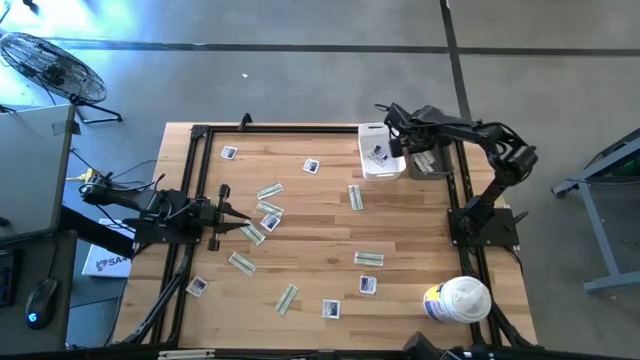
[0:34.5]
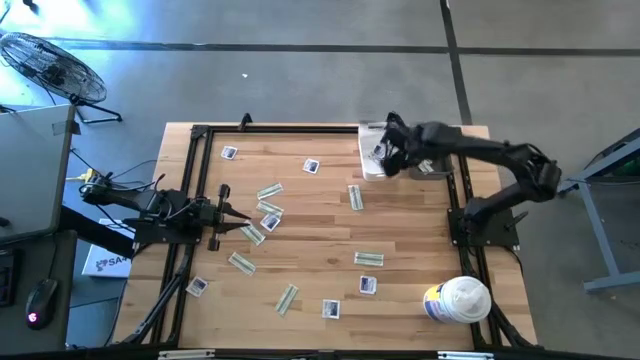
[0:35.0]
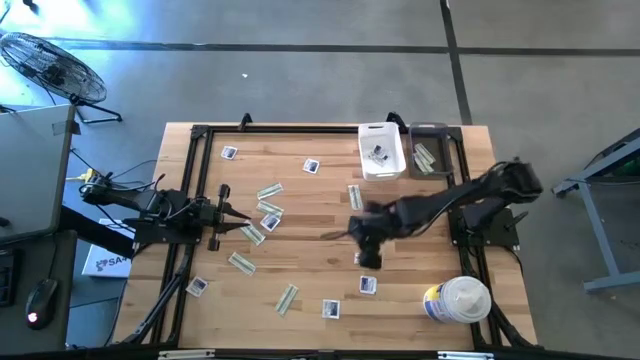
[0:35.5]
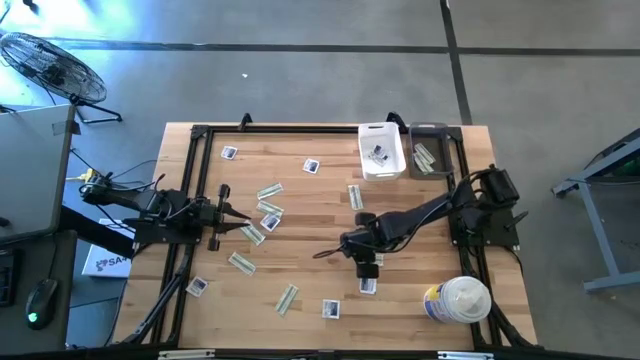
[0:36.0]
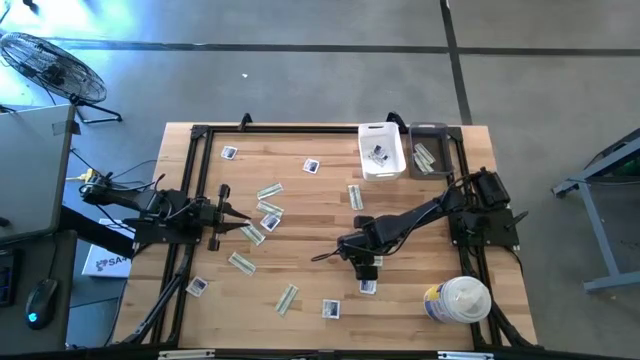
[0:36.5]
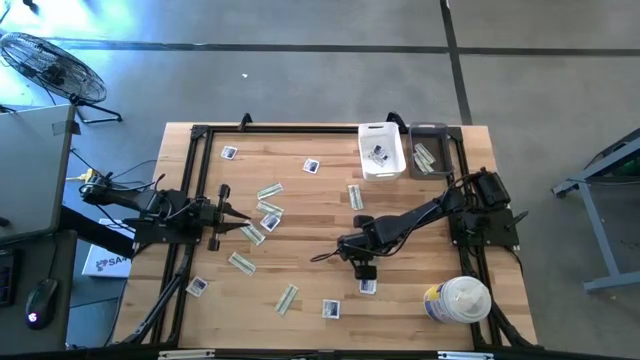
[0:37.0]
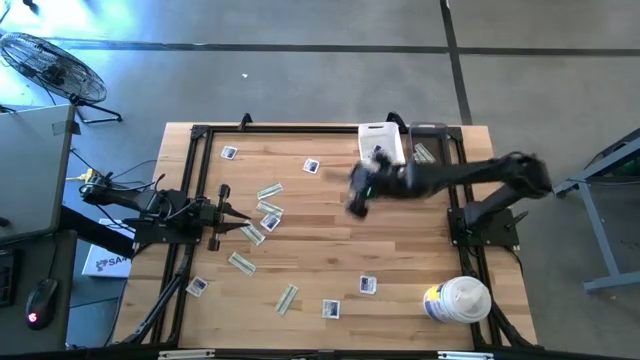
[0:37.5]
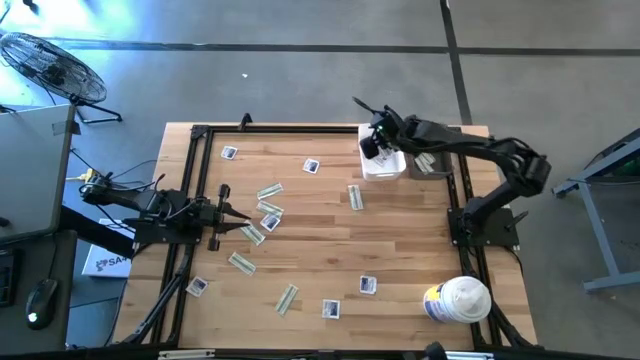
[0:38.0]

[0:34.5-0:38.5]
Task: Pick & Place First Aid Supplies
Put the bandage into the gray bin

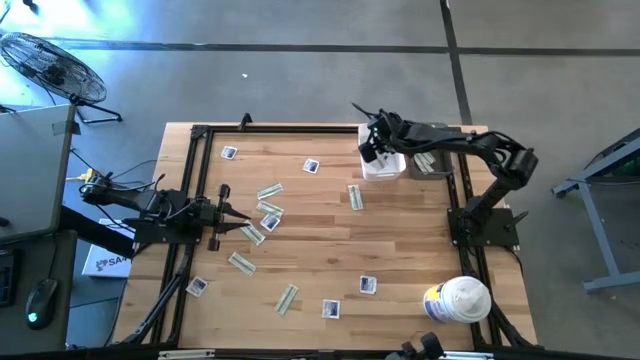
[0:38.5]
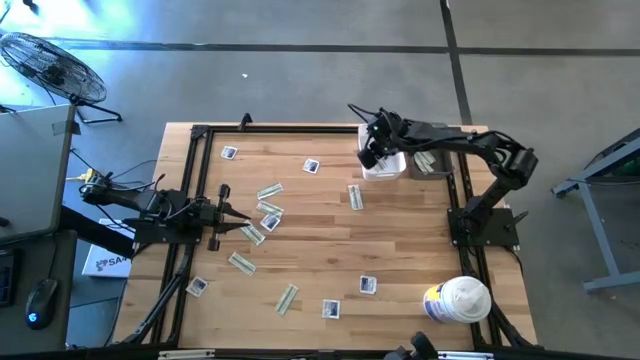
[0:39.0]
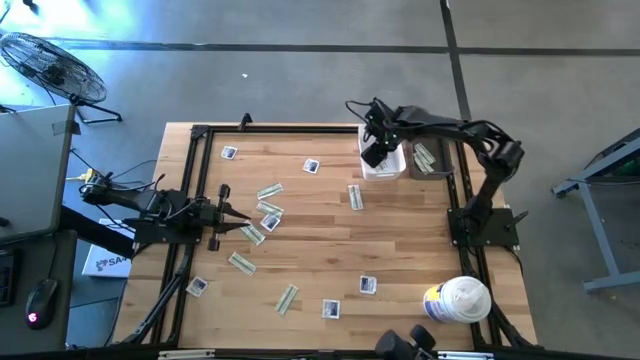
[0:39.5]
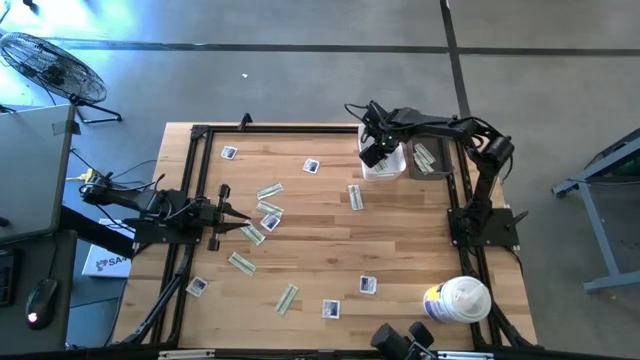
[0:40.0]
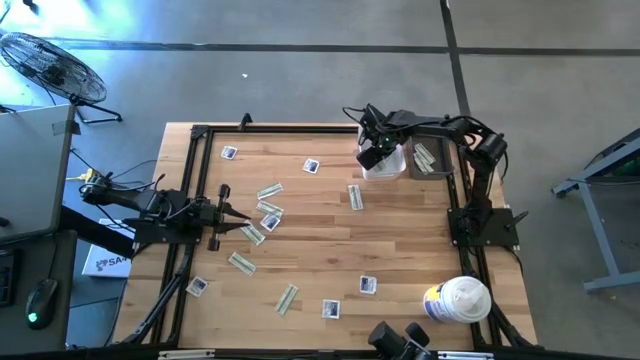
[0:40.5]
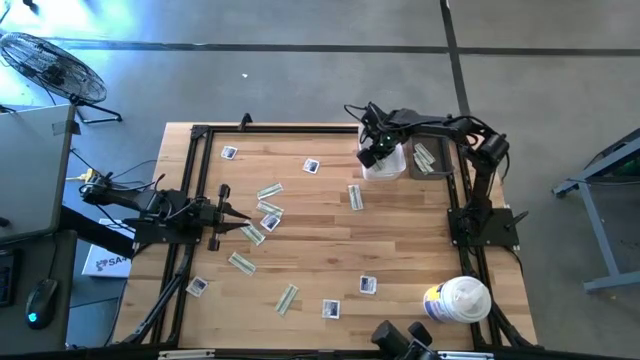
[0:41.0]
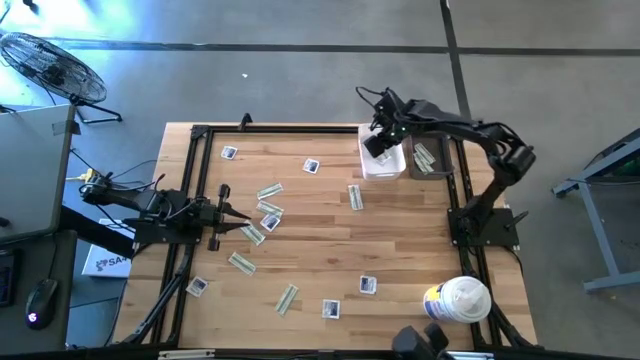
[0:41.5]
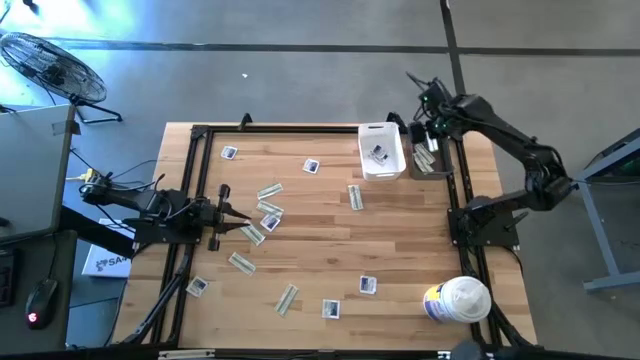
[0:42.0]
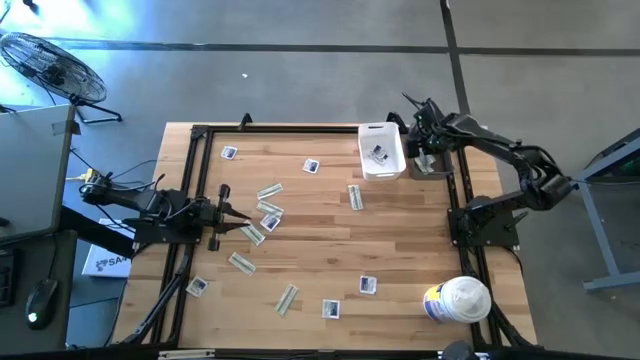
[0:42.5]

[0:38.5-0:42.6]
Put the bandage into the gray bin

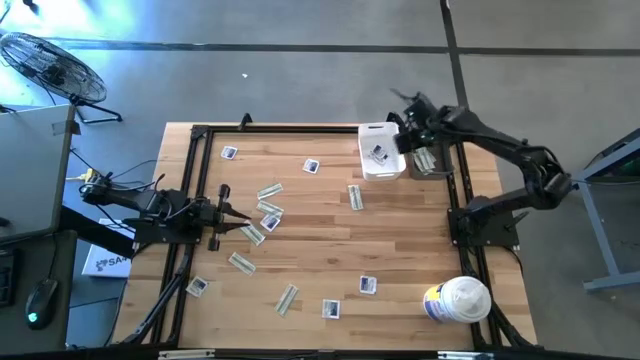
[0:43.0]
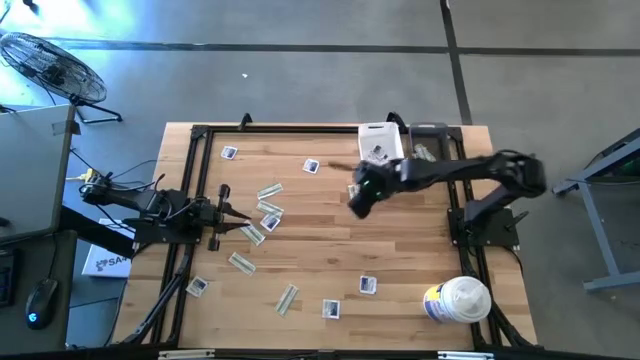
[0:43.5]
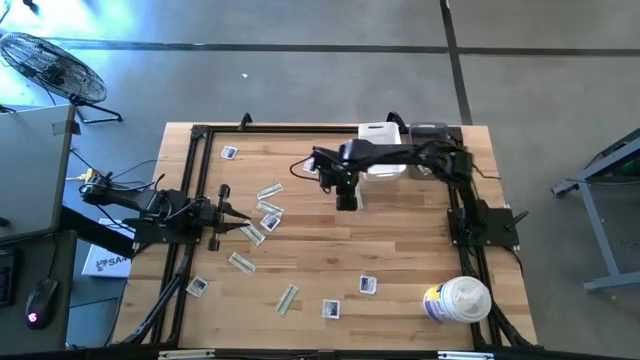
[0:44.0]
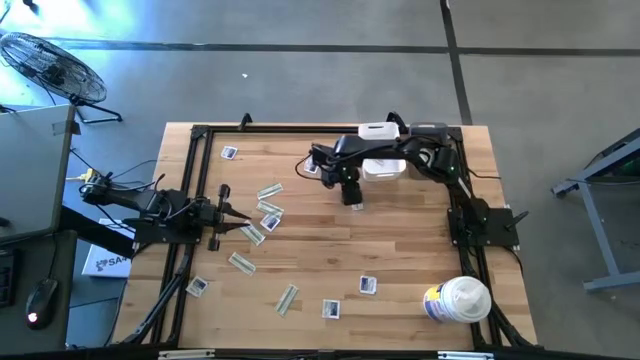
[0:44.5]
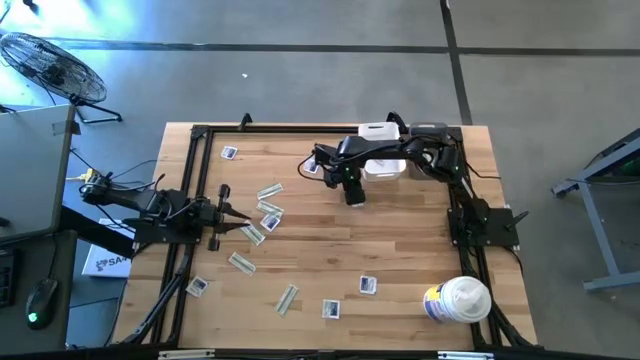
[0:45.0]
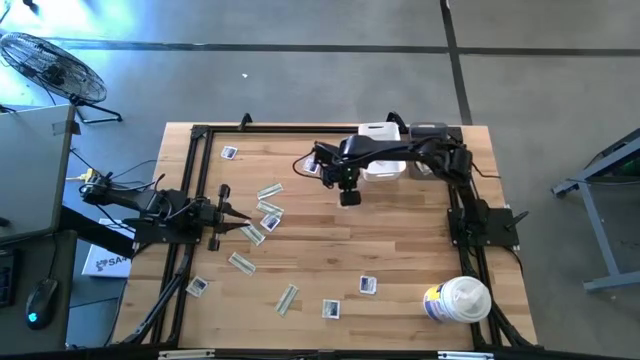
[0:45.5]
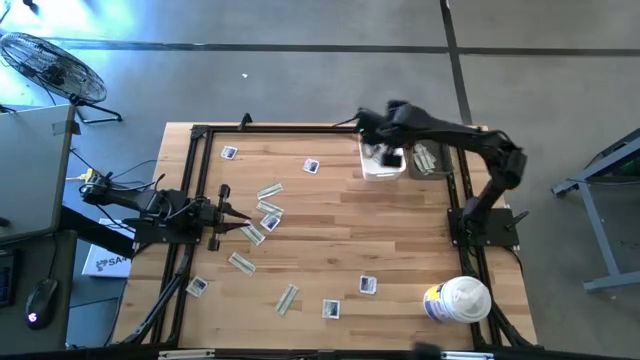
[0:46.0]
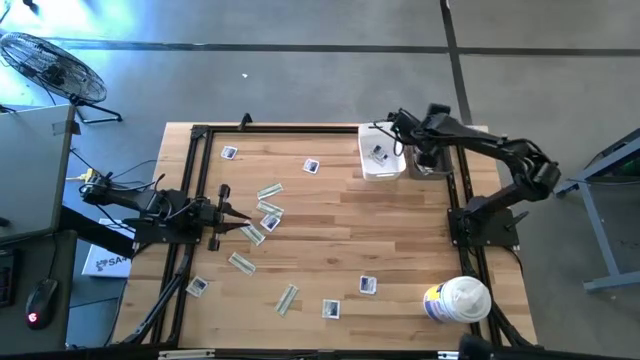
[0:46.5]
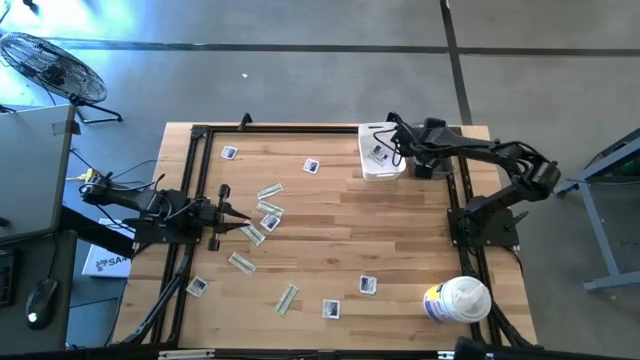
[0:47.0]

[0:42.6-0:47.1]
Put the bandage into the gray bin

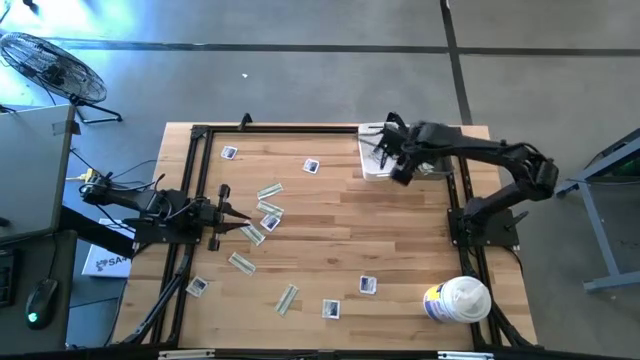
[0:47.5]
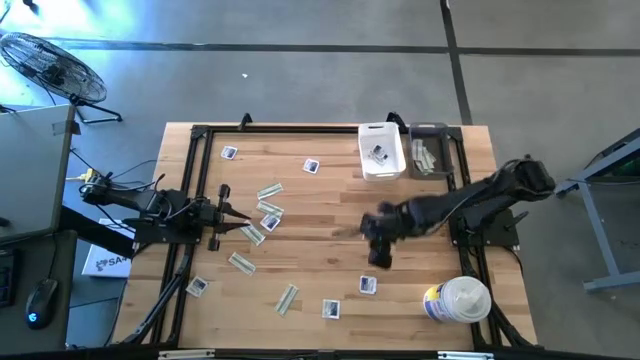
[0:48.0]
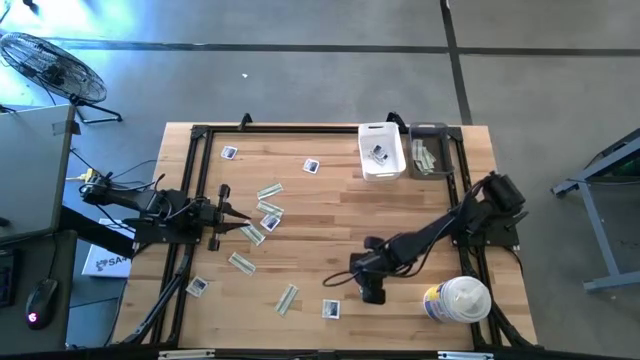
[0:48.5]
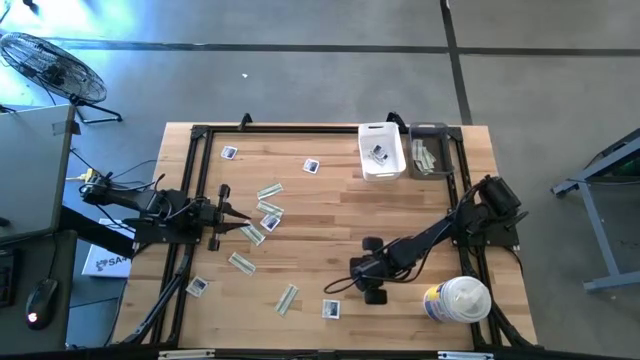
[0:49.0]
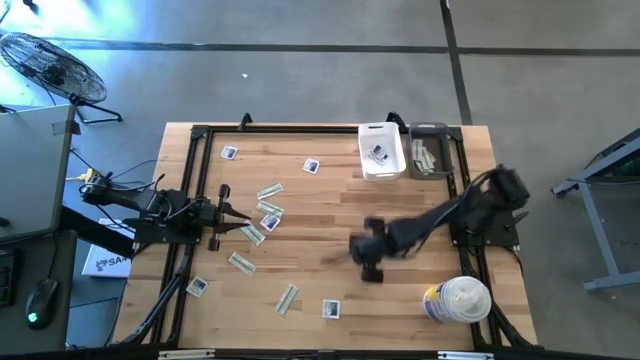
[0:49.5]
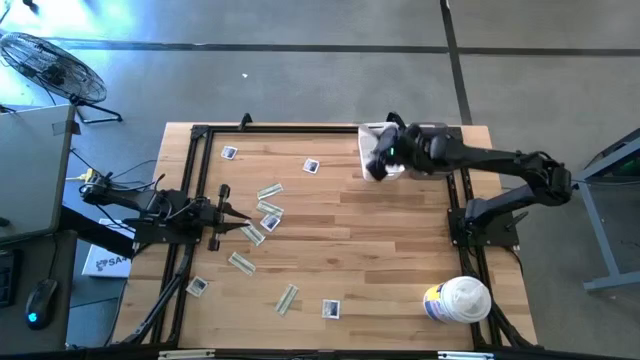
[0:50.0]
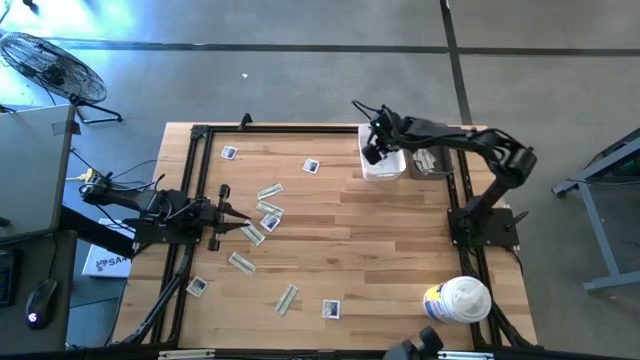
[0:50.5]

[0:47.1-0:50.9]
Put the alcohol pad into the white bin

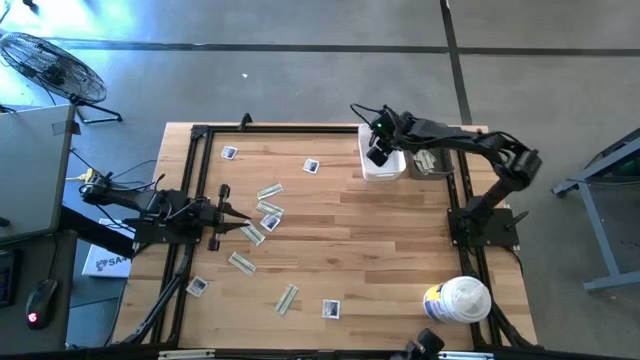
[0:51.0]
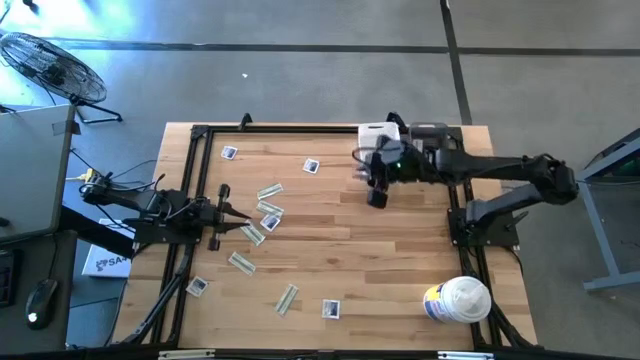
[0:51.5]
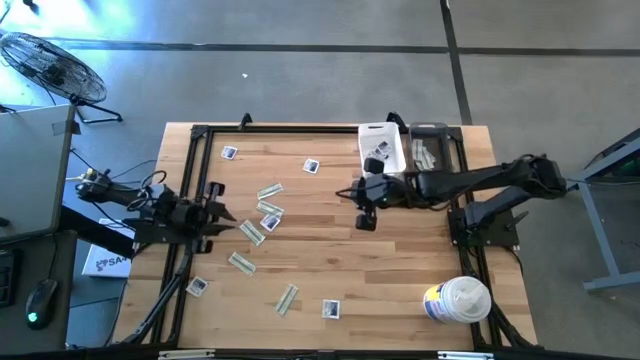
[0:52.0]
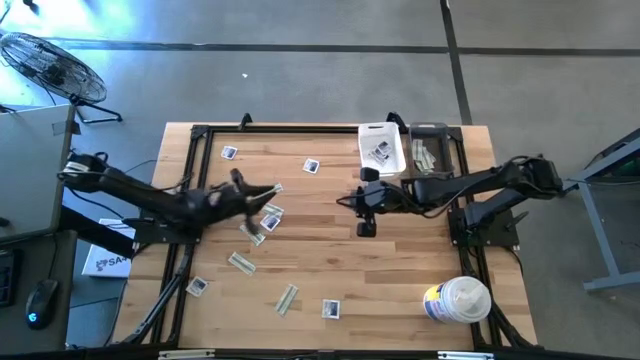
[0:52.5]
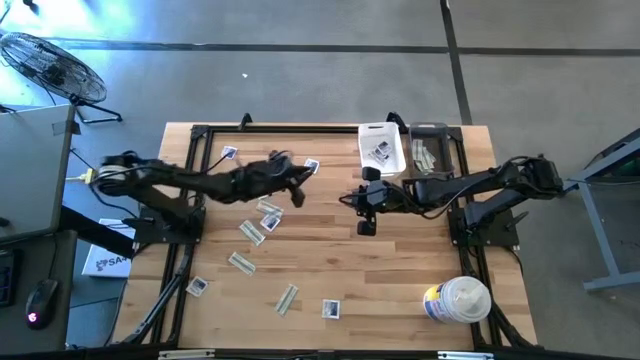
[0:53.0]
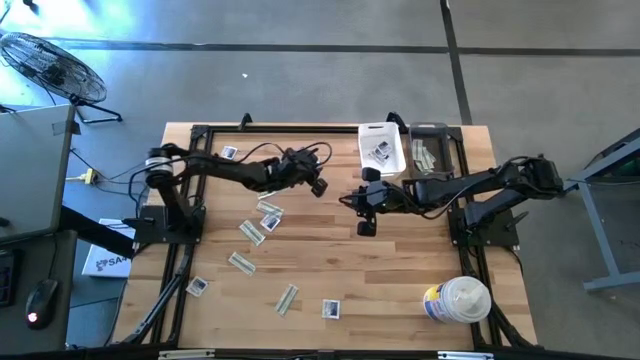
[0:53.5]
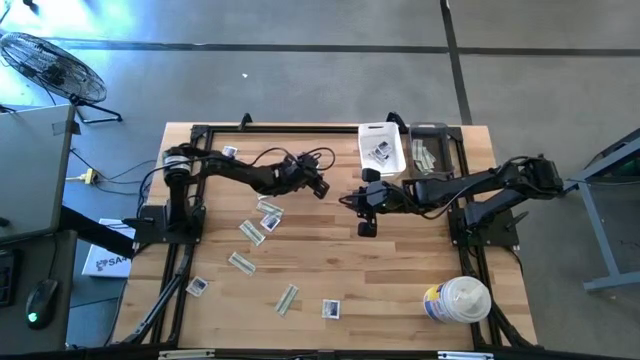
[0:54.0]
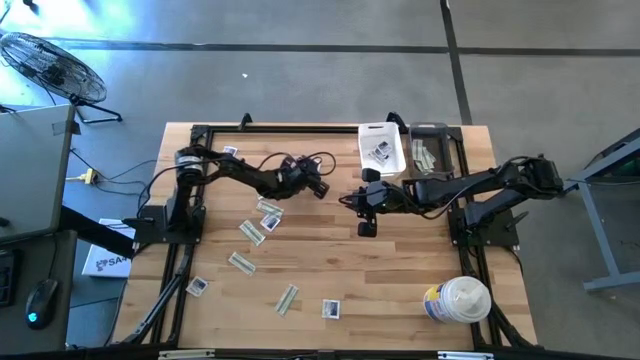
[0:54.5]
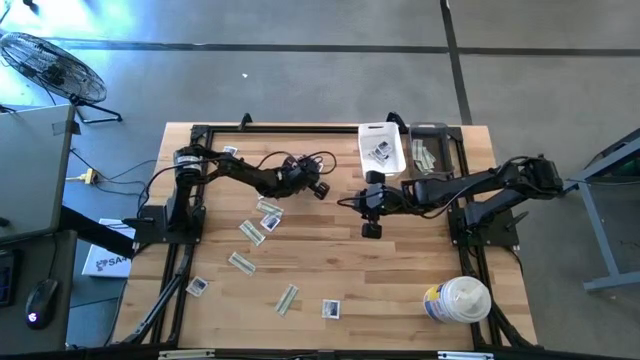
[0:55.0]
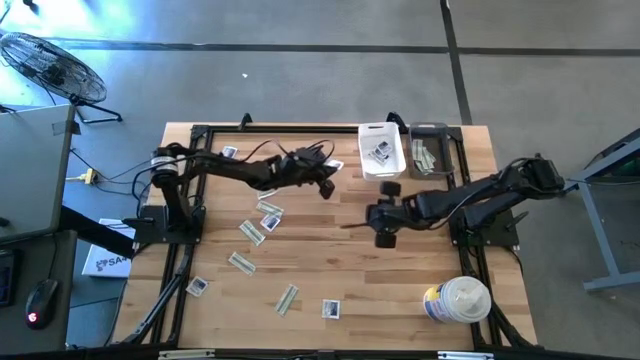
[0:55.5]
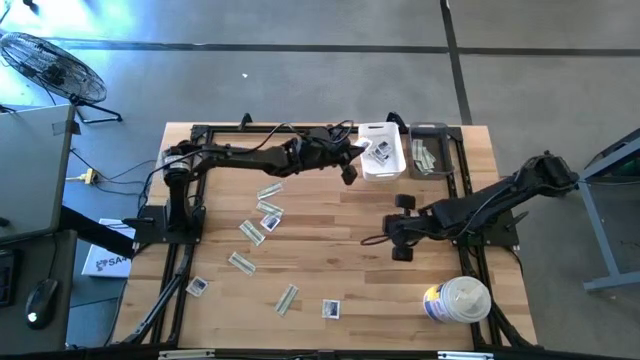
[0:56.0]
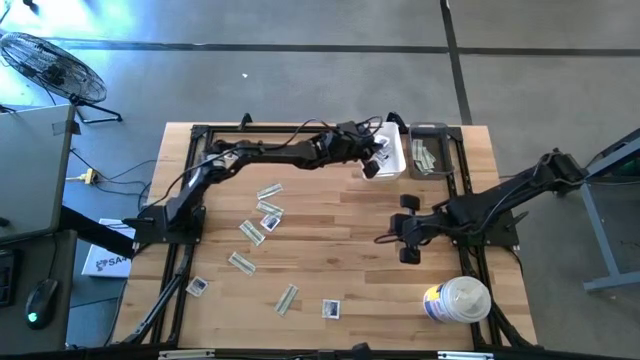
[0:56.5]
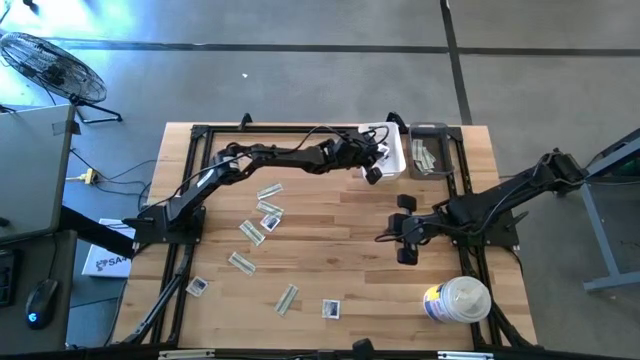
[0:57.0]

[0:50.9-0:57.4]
Put the alcohol pad into the white bin
